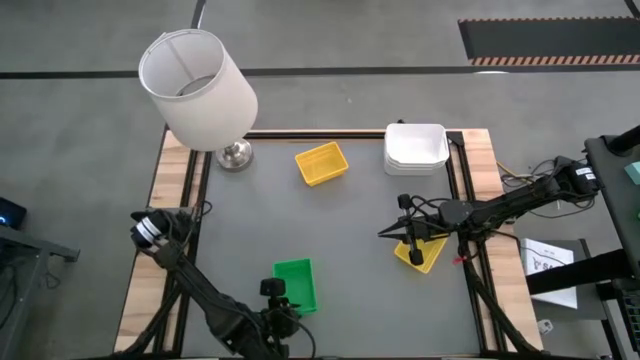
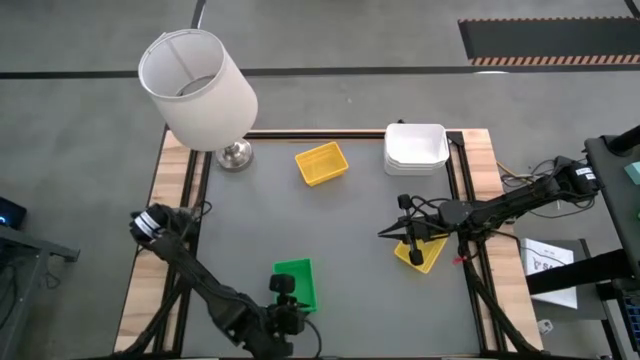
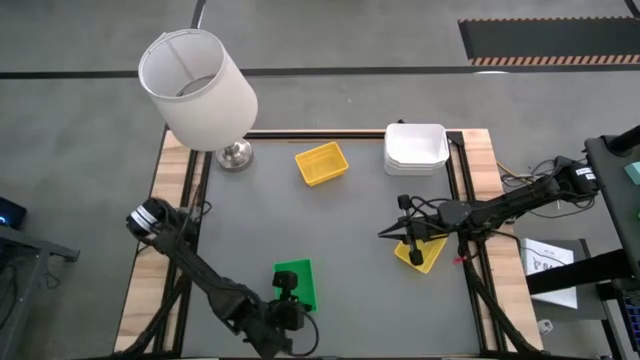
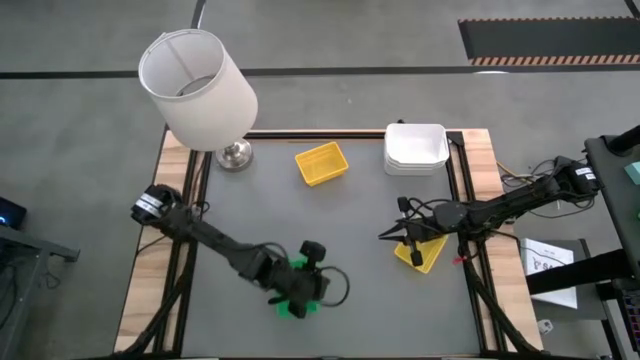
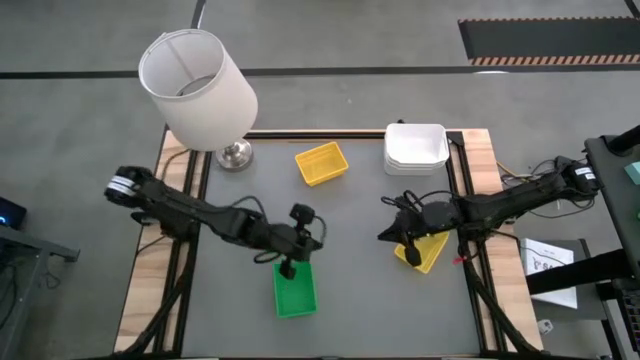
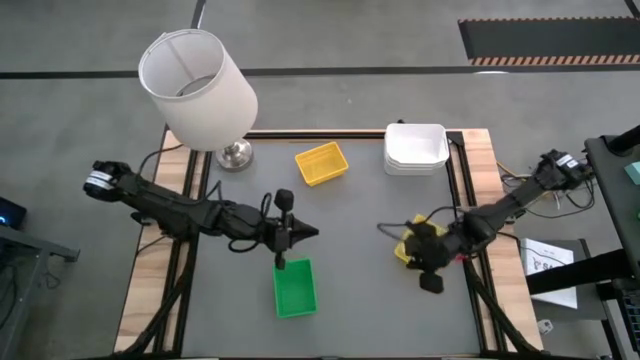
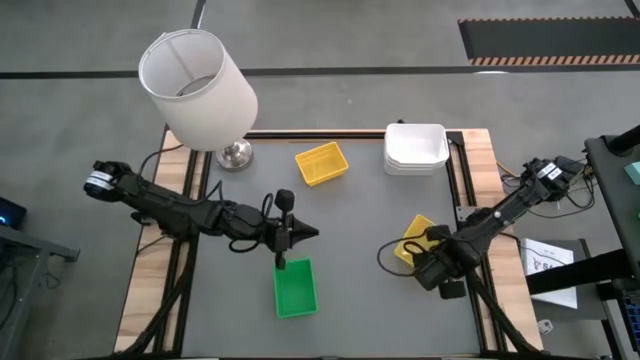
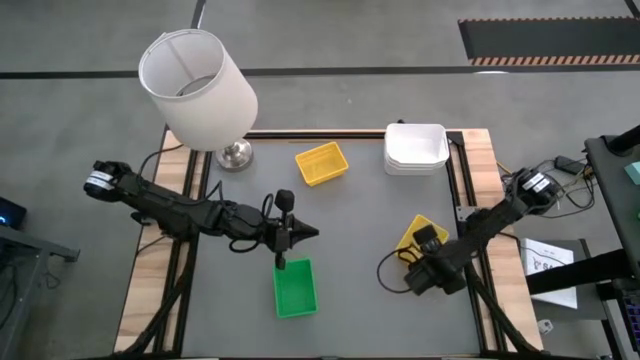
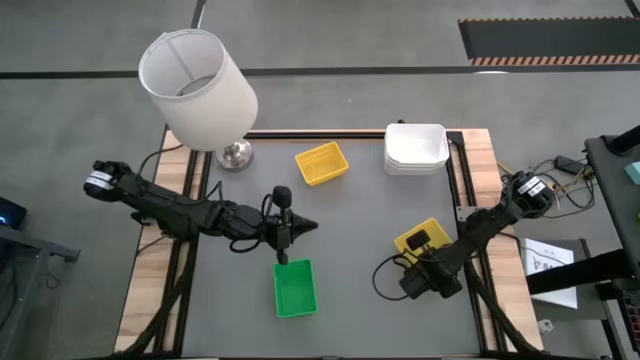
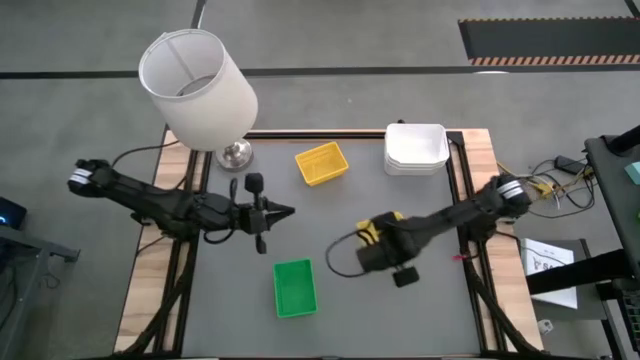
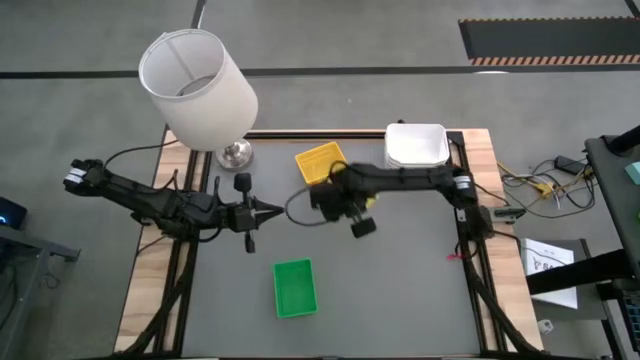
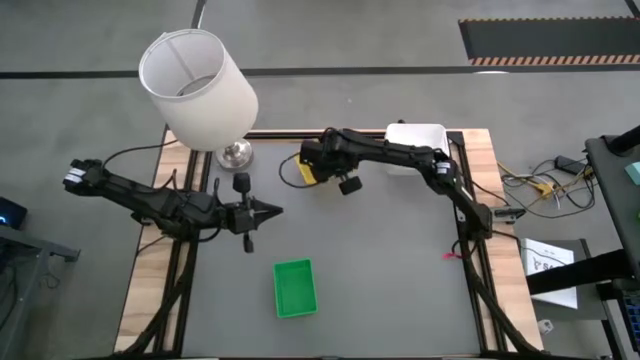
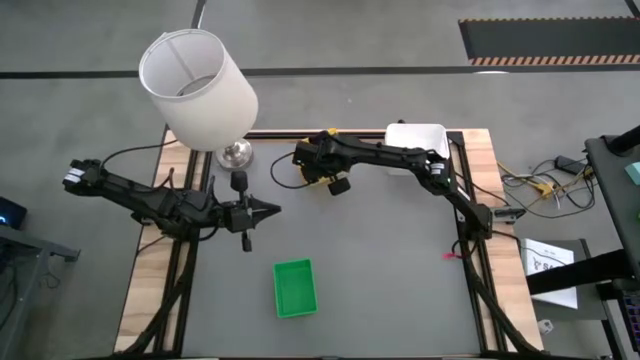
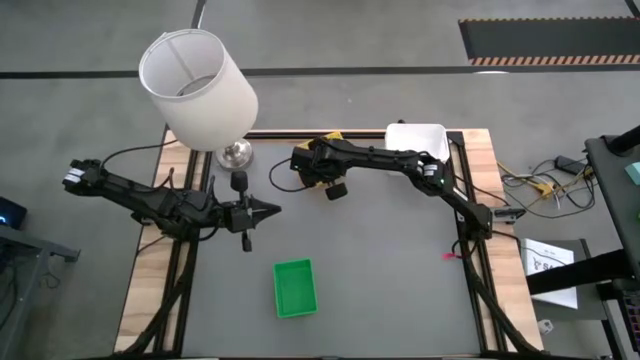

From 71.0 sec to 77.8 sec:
Stack the bottom yellow bin on the top yellow bin

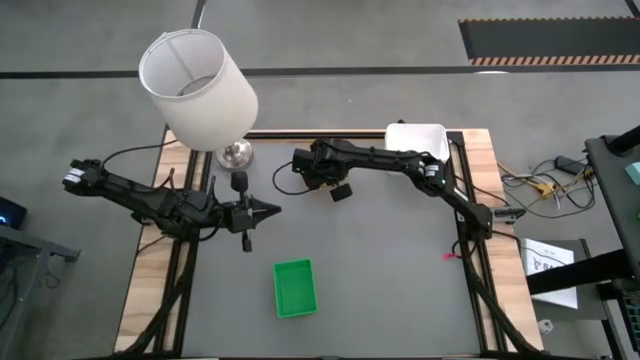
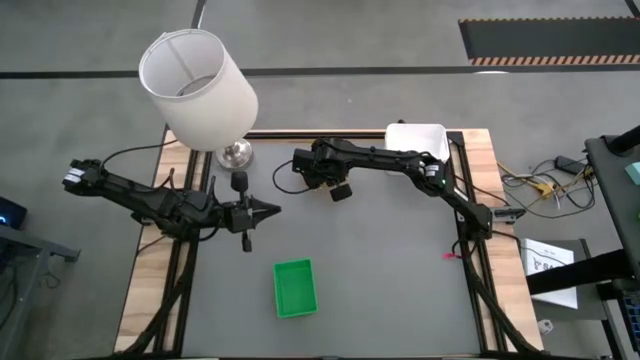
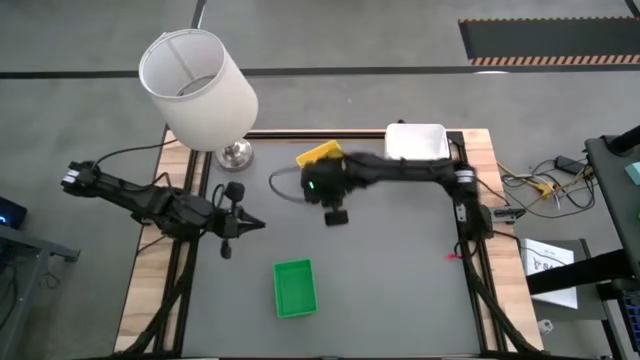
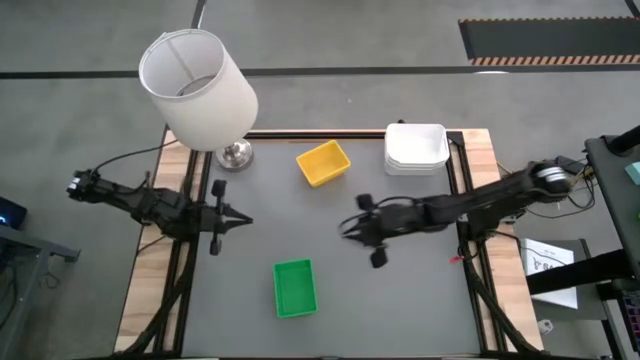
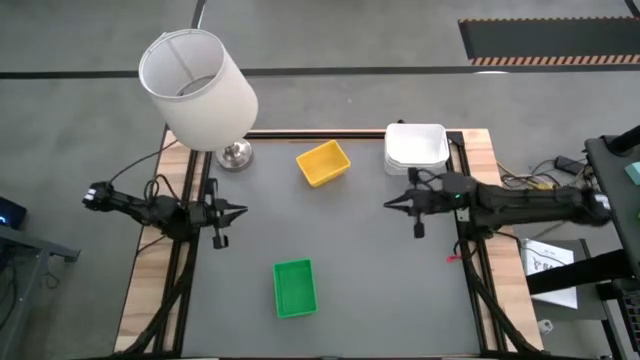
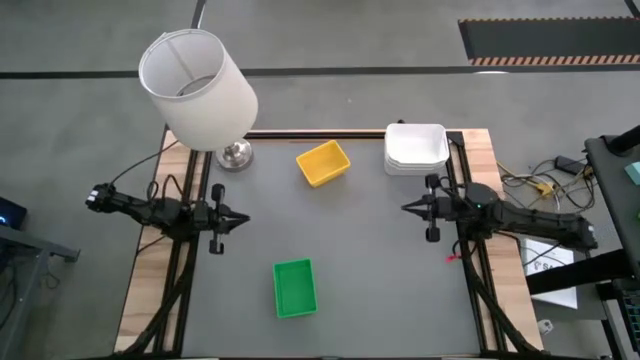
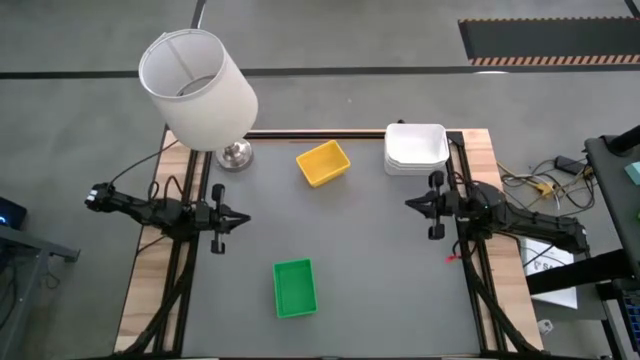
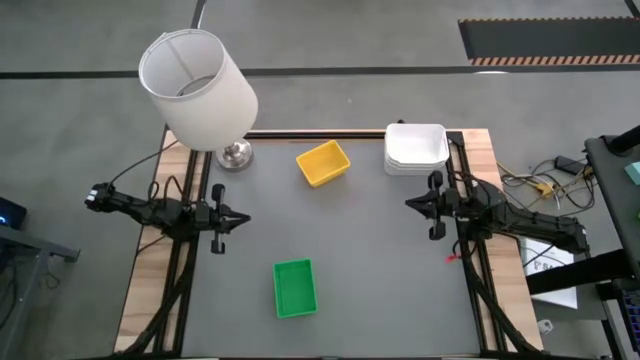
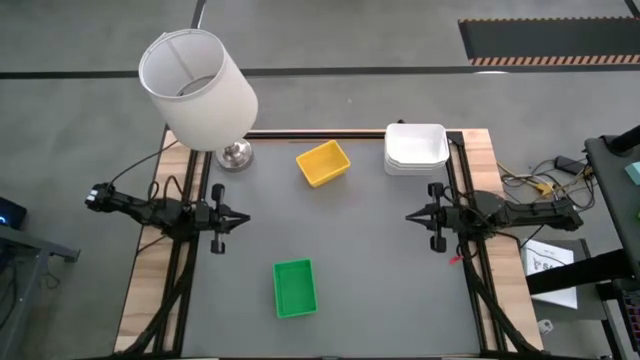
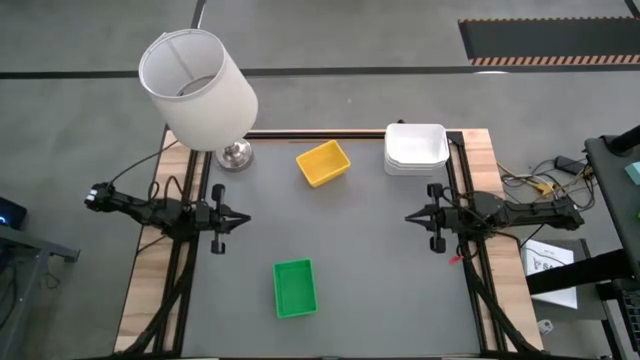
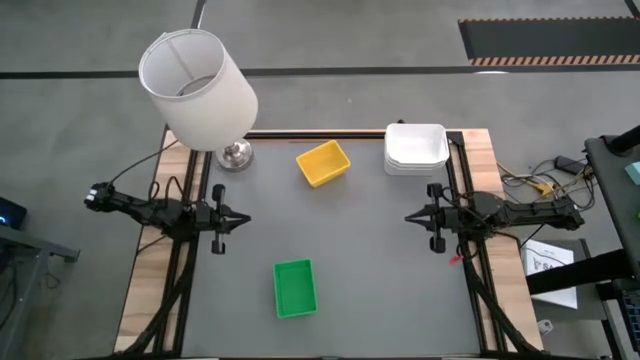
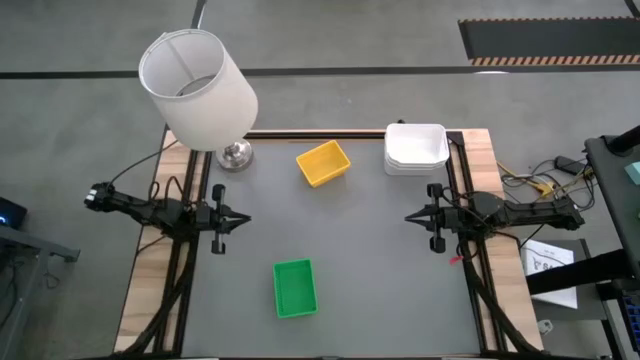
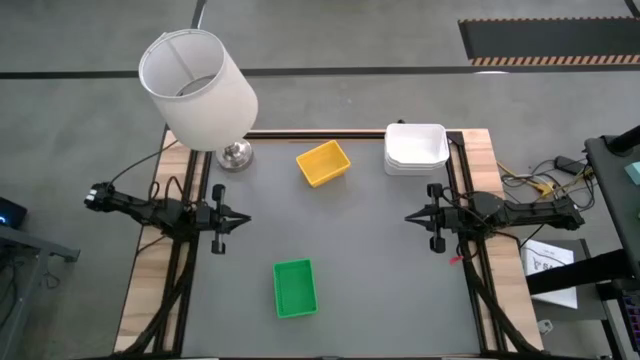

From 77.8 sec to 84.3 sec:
Return to Home Position
